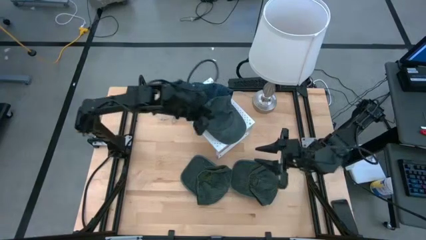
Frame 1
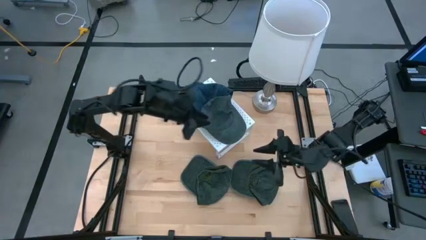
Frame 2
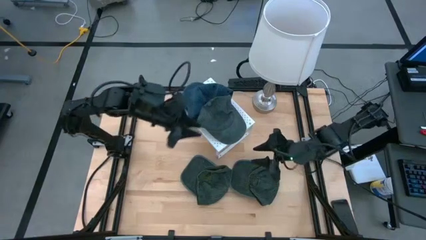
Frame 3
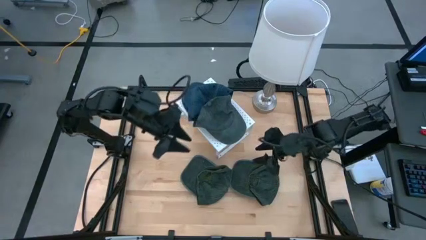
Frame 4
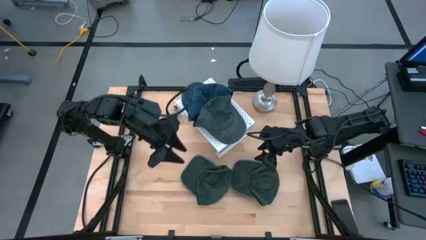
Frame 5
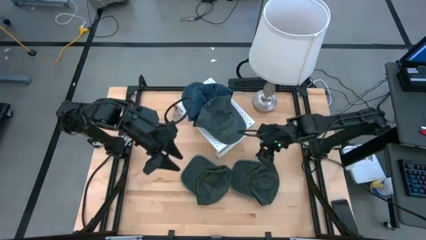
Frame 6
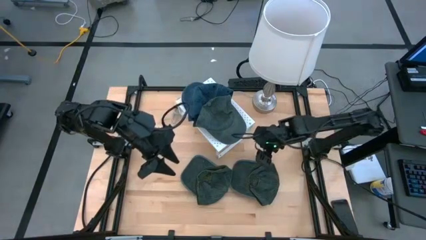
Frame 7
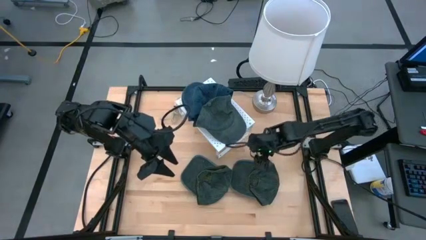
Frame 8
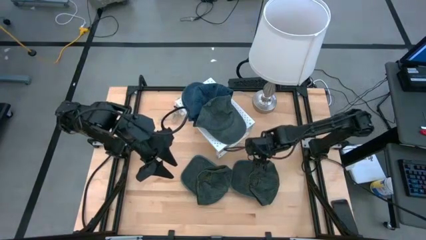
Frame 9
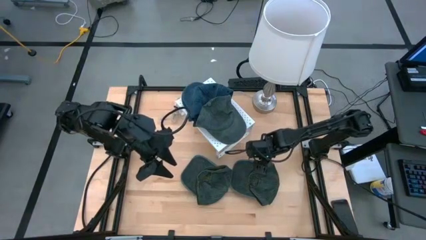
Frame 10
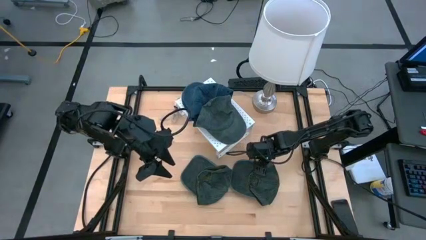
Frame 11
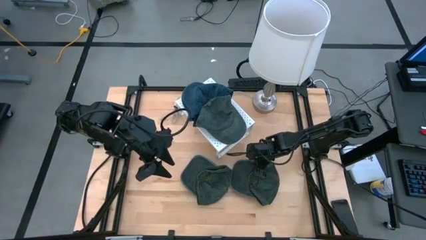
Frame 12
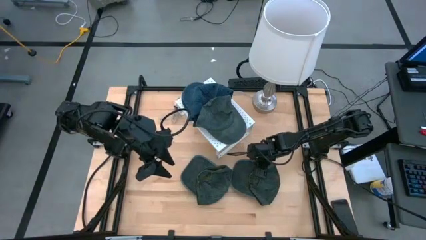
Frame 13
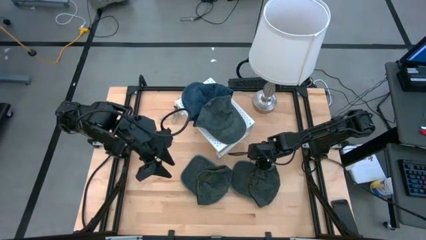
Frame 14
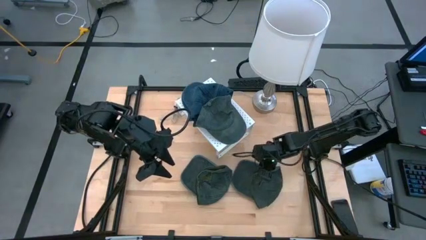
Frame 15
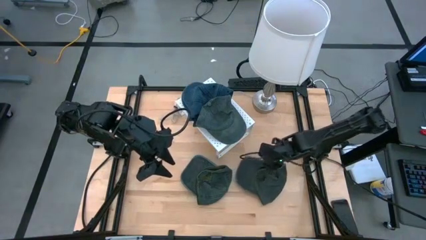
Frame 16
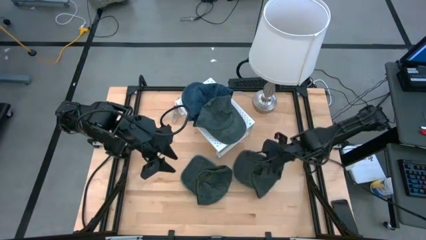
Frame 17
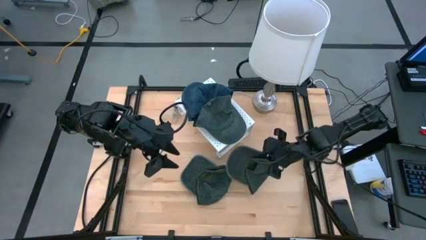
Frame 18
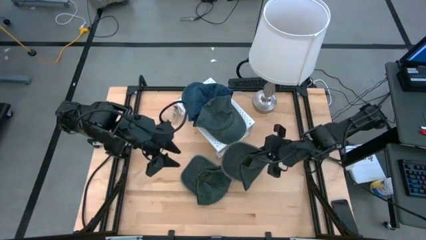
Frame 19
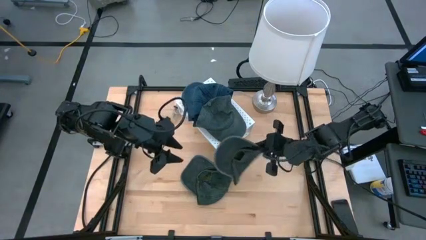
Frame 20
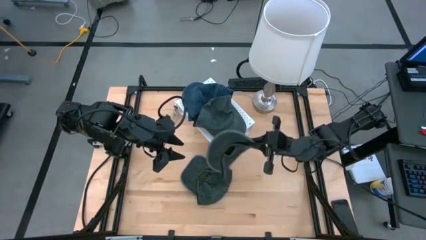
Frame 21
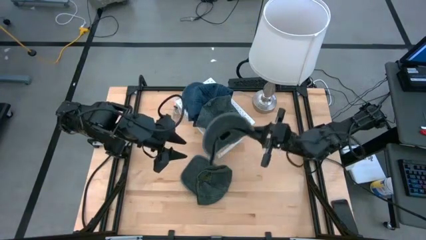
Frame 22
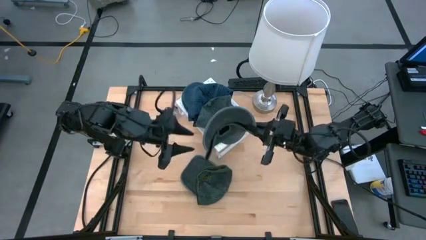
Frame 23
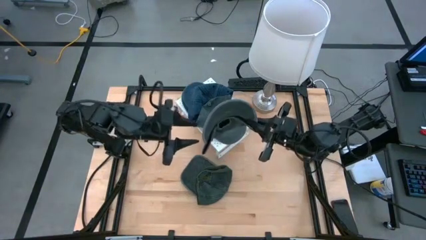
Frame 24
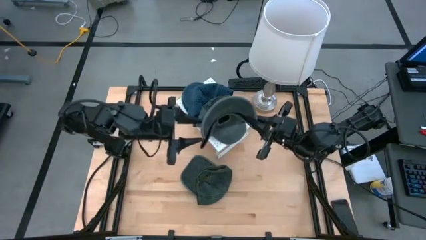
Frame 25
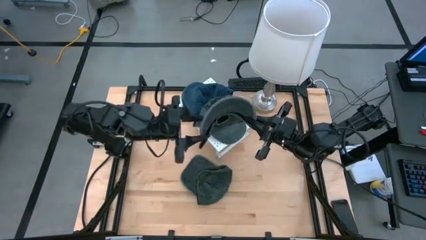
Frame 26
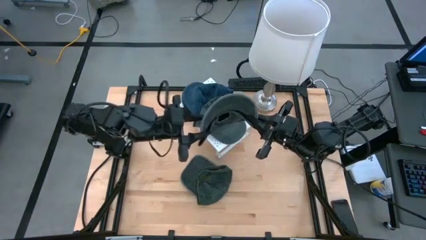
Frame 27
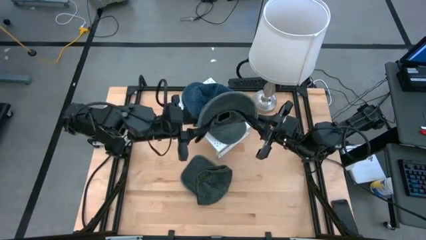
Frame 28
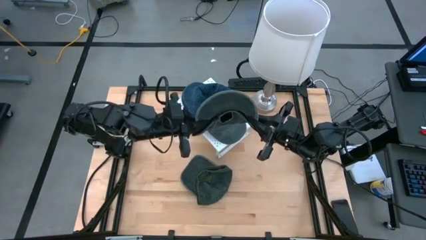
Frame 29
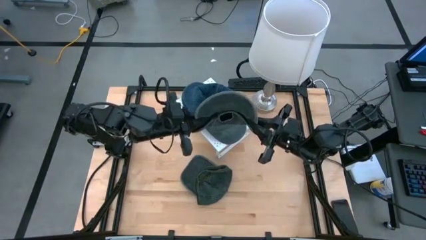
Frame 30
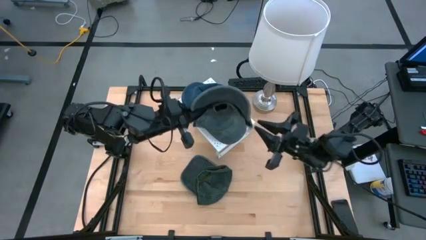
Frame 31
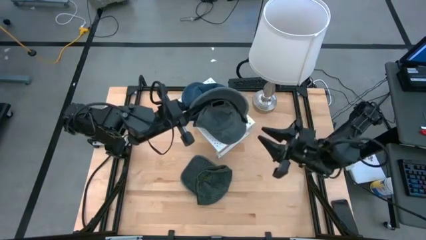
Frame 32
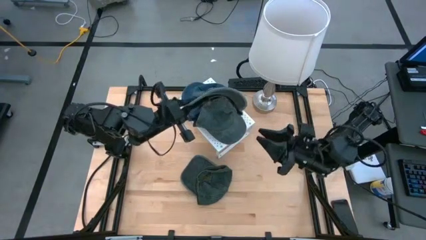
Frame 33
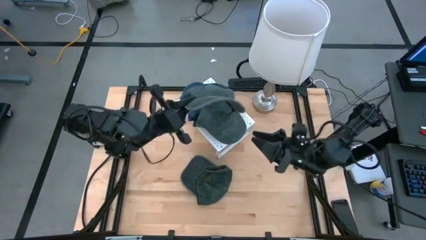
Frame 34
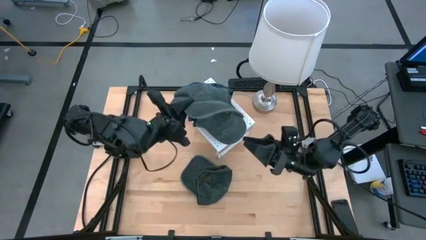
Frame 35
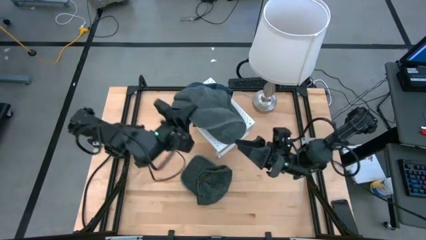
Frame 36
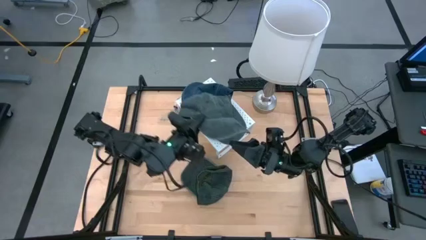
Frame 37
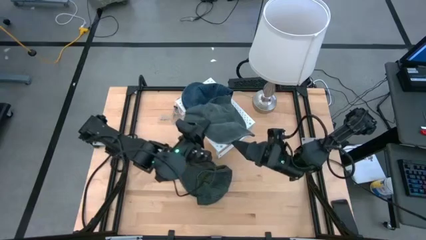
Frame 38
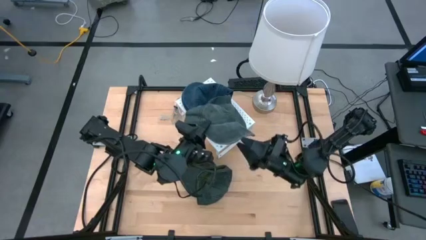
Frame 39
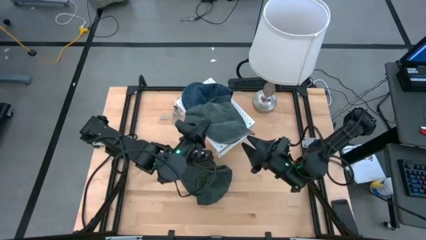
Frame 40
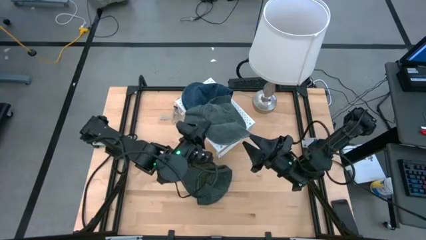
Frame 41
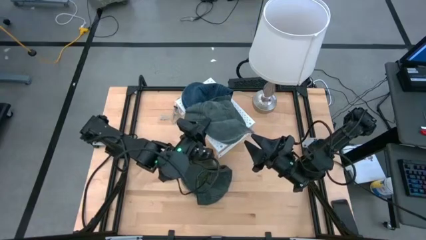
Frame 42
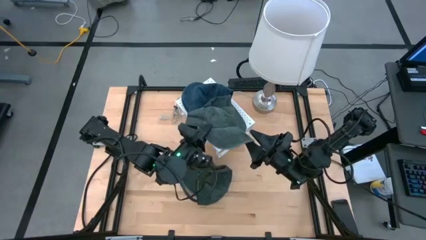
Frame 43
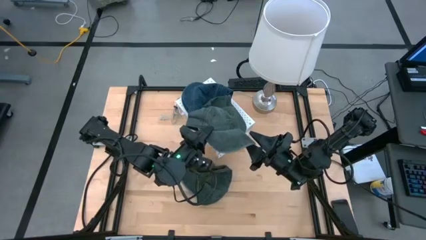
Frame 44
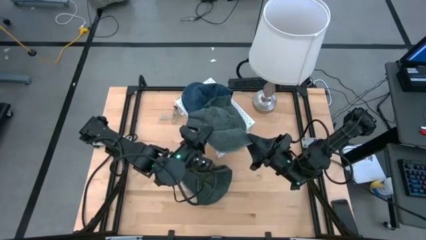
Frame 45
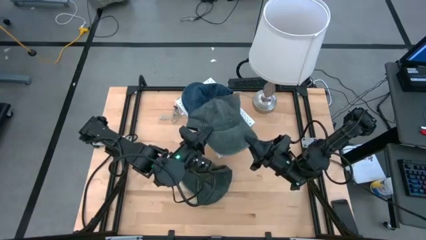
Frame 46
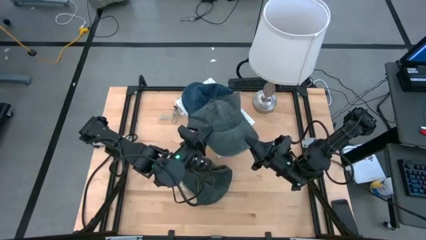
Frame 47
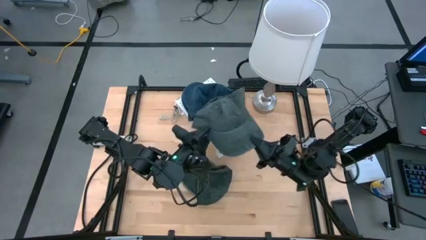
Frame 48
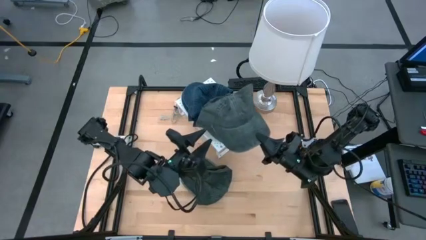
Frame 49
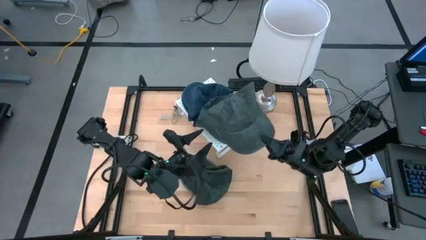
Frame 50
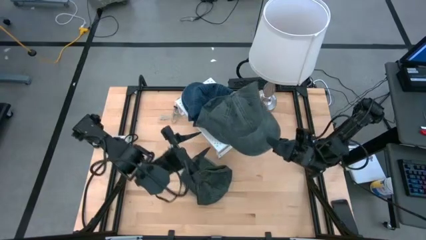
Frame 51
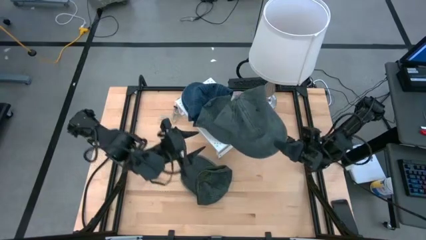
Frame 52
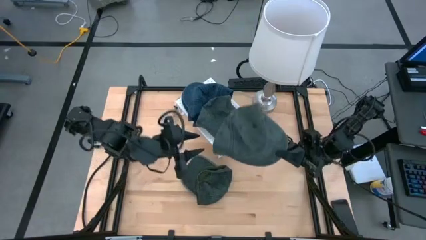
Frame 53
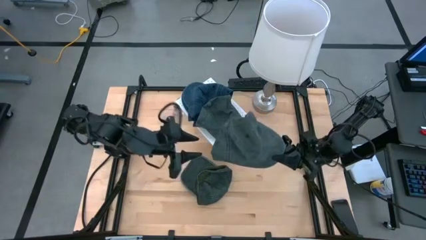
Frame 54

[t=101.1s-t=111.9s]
Task: Pick & Place hat
Stack the right gray cap on the gray cap on the shelf

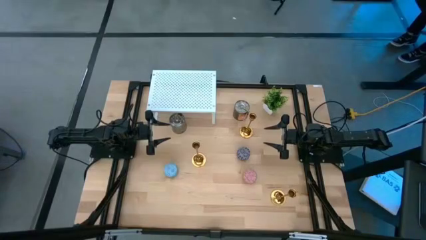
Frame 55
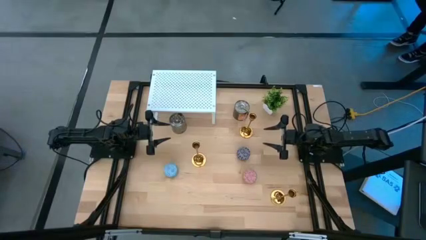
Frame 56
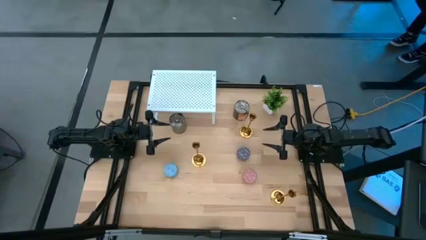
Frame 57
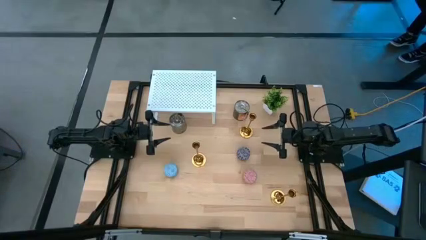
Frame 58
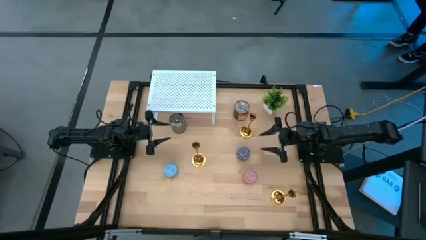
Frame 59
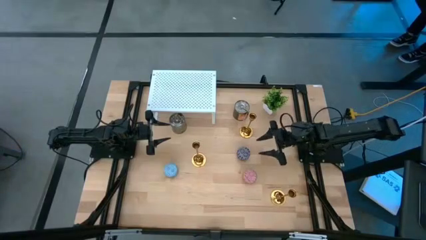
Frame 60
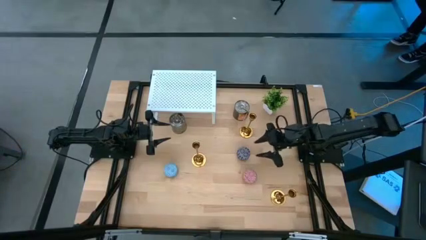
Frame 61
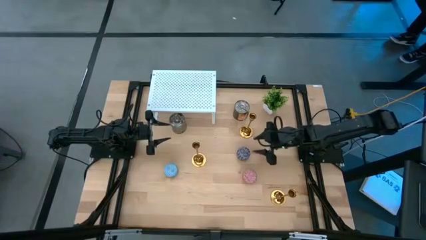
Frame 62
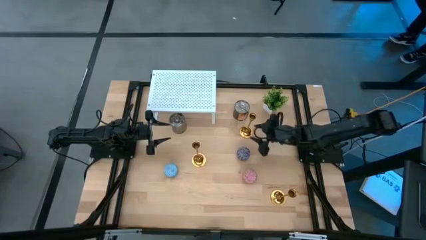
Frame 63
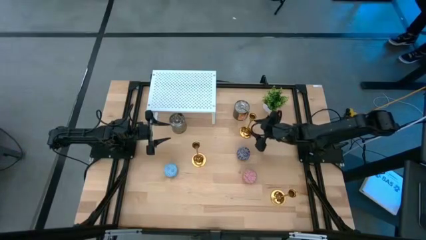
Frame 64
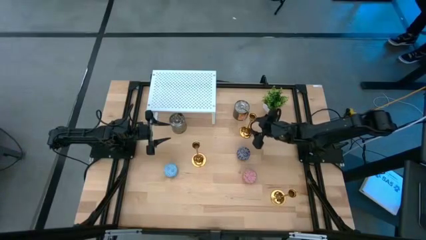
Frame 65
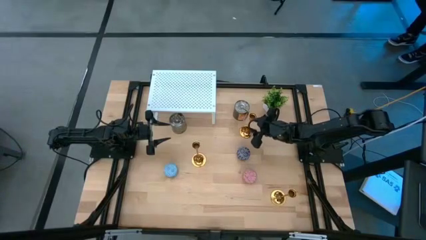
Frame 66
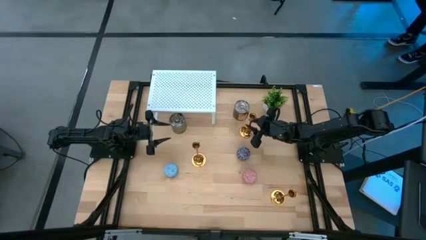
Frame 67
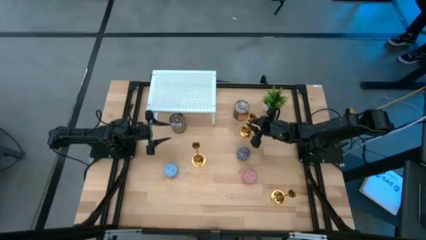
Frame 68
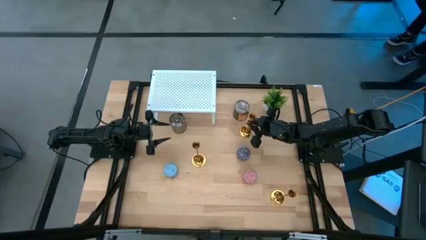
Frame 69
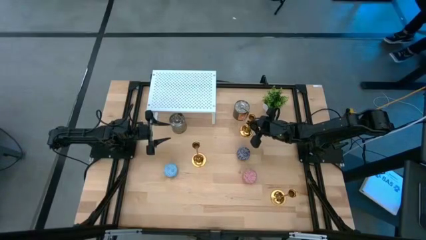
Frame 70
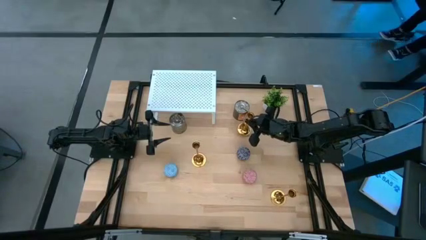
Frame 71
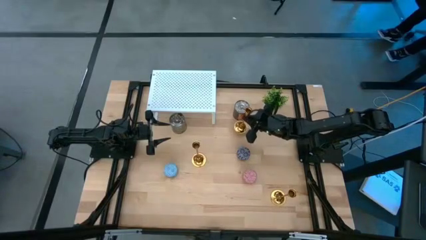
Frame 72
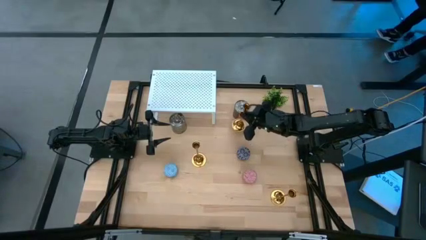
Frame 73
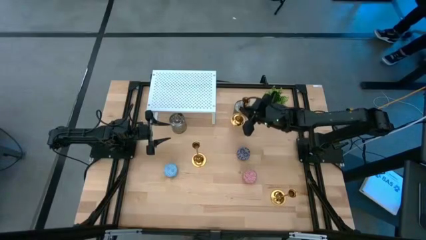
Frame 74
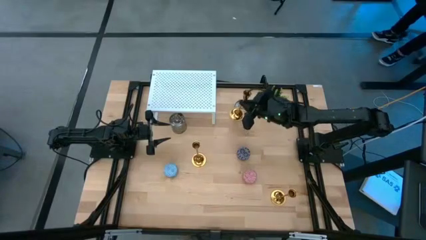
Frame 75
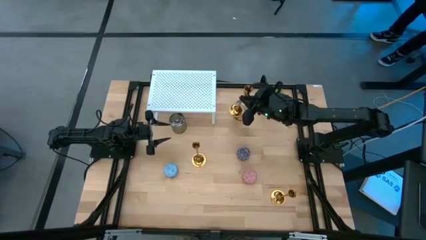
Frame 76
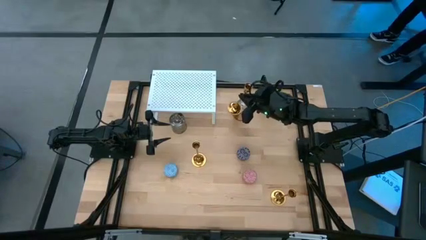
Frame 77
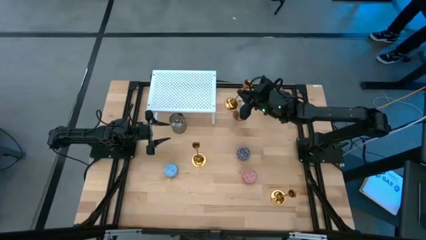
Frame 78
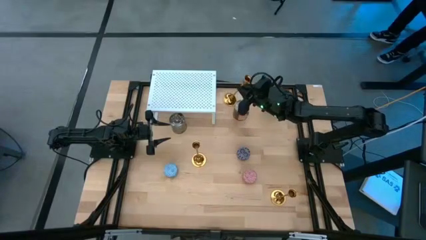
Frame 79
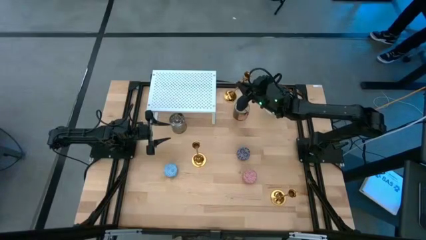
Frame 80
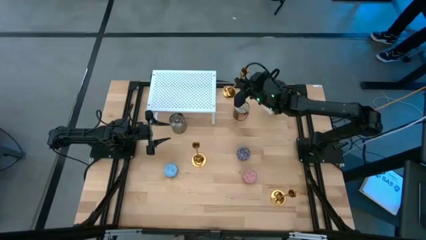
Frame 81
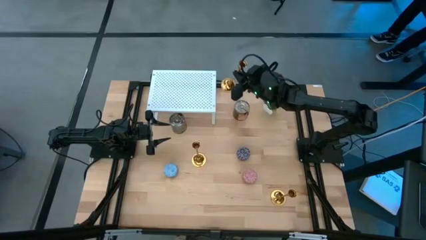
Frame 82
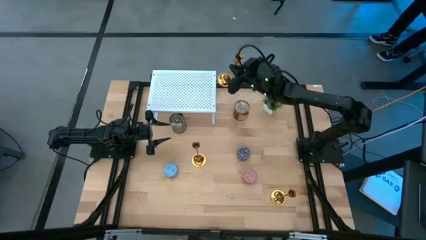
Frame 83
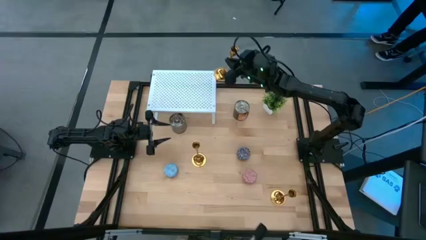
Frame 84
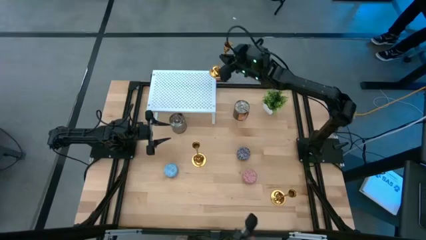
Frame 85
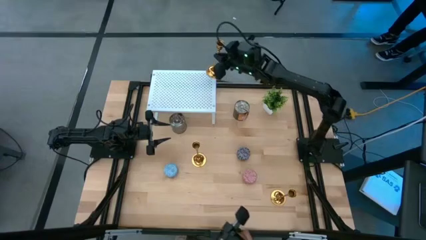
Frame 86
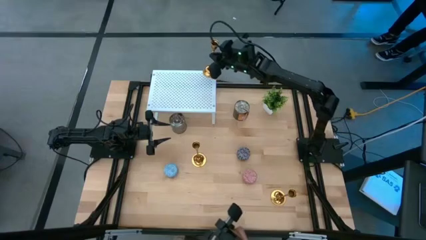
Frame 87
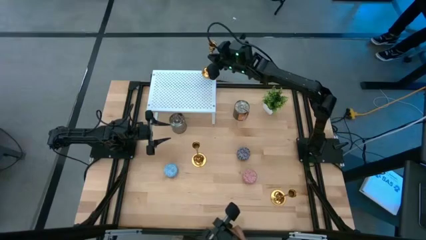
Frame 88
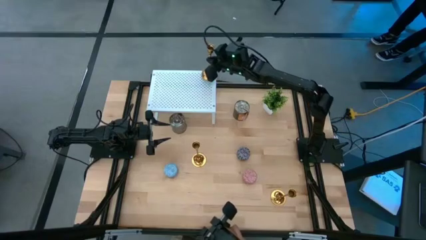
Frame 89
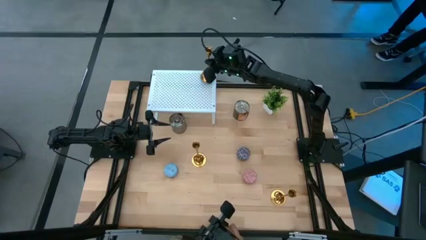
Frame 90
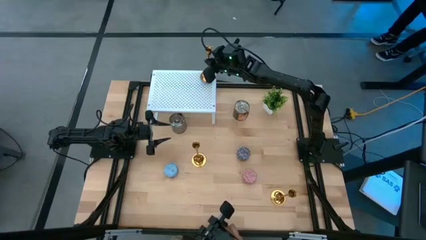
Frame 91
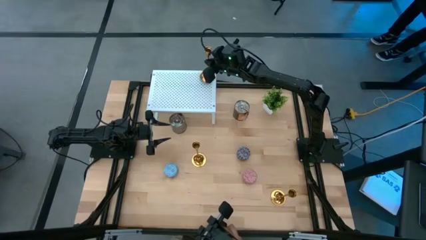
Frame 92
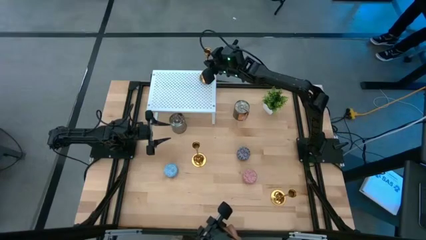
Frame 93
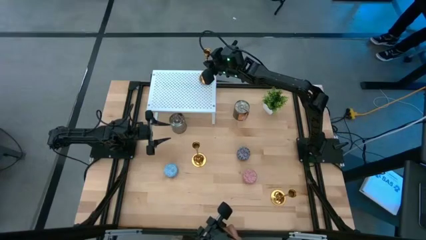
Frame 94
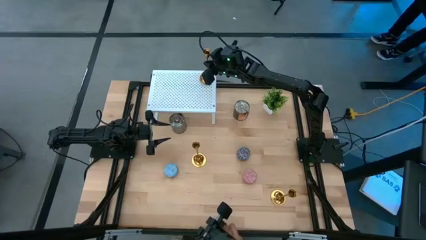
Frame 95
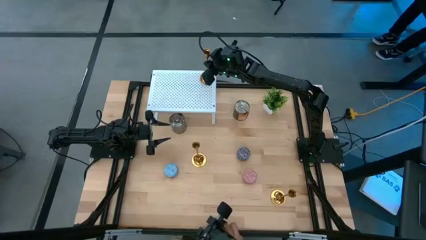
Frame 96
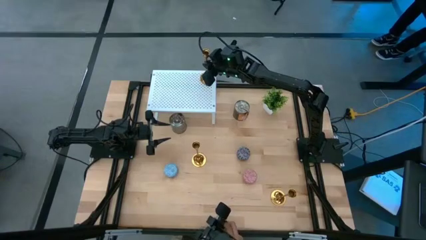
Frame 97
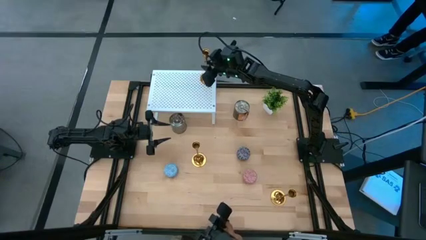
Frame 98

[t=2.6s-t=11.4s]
Task: Pick & Place candle stick holders
Put the top gold candle holder on the shelf
